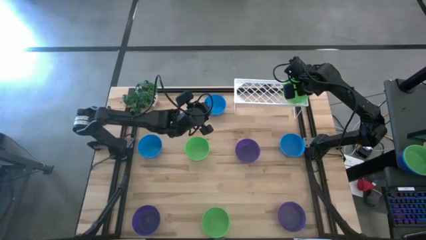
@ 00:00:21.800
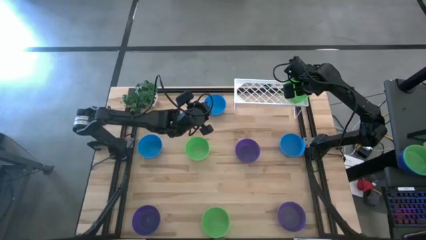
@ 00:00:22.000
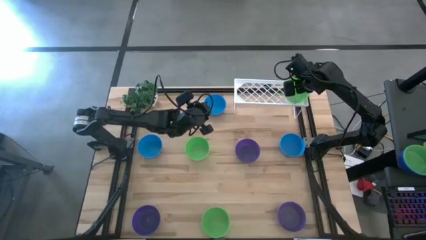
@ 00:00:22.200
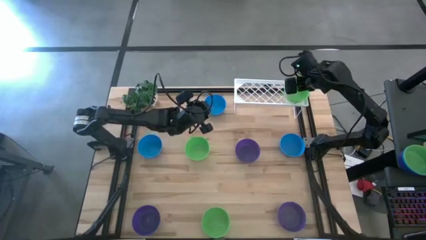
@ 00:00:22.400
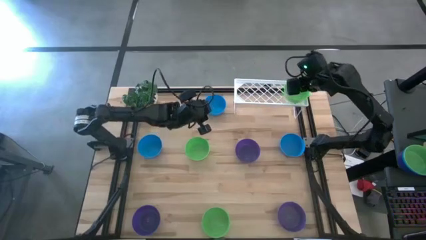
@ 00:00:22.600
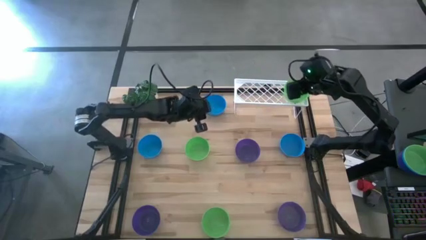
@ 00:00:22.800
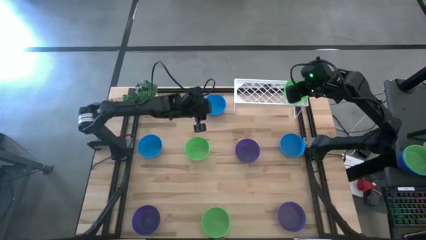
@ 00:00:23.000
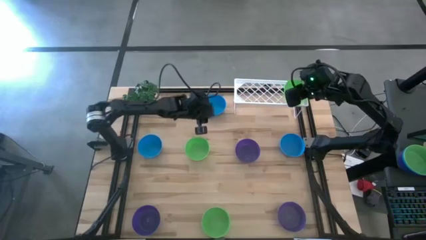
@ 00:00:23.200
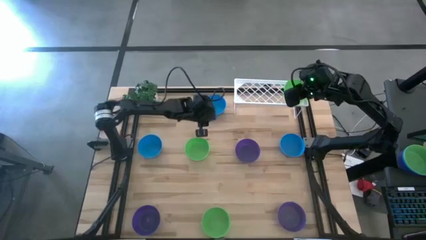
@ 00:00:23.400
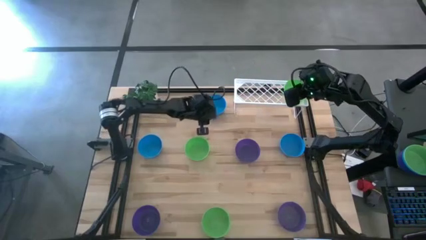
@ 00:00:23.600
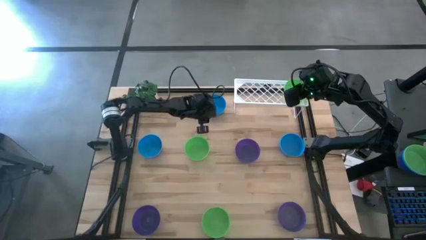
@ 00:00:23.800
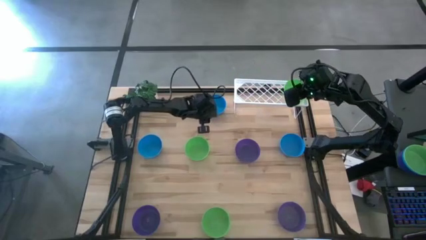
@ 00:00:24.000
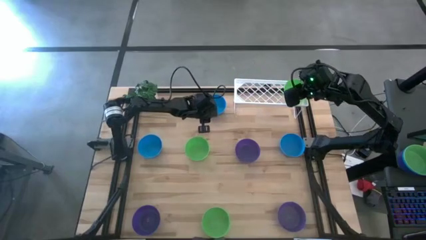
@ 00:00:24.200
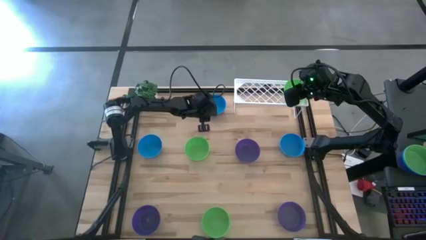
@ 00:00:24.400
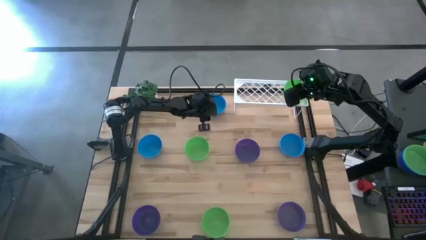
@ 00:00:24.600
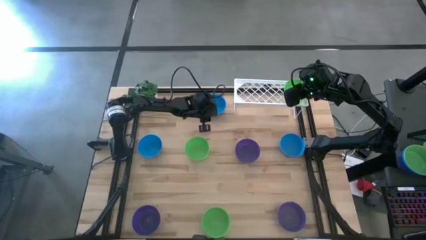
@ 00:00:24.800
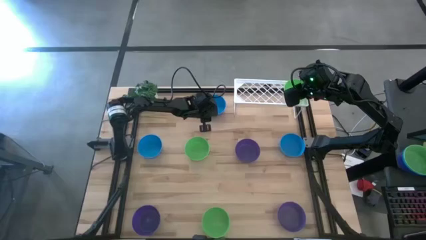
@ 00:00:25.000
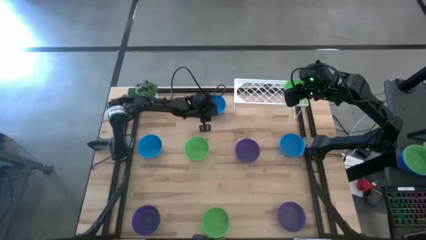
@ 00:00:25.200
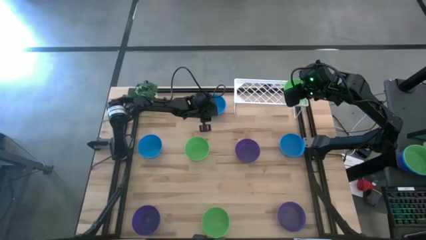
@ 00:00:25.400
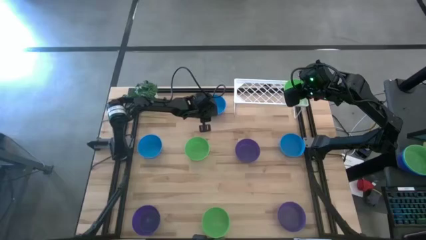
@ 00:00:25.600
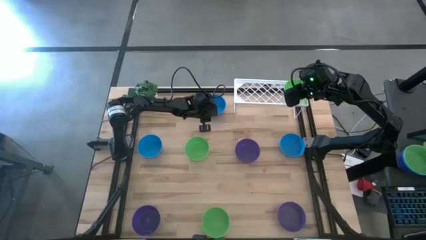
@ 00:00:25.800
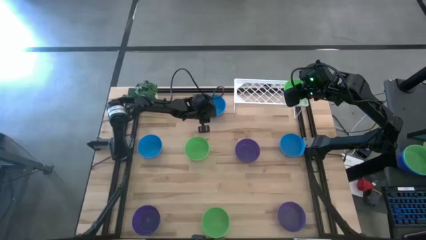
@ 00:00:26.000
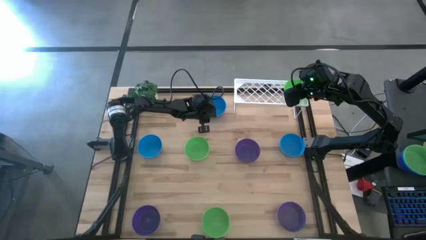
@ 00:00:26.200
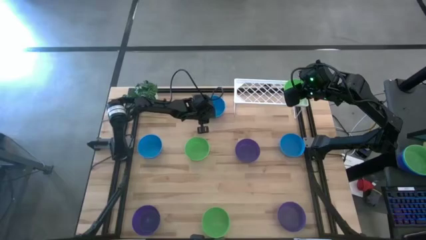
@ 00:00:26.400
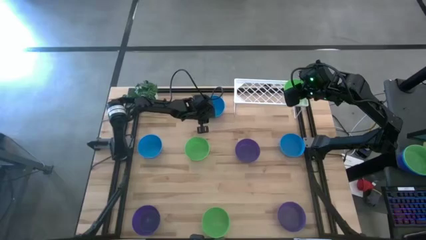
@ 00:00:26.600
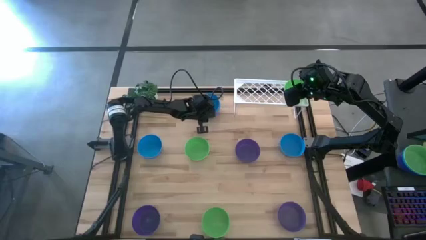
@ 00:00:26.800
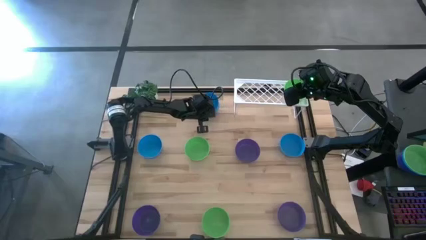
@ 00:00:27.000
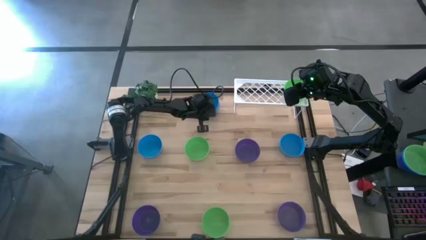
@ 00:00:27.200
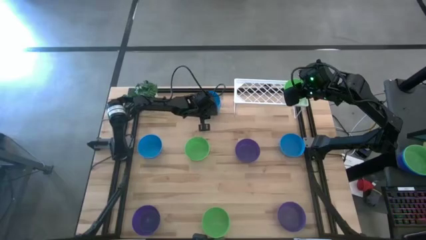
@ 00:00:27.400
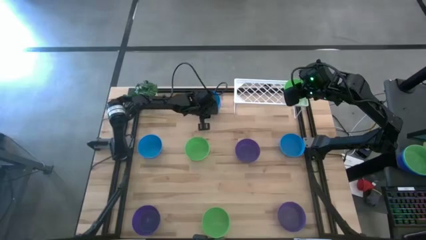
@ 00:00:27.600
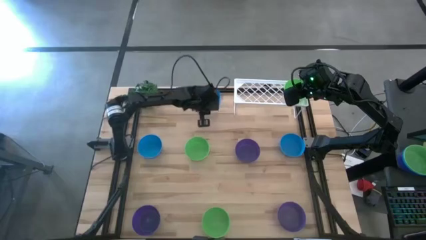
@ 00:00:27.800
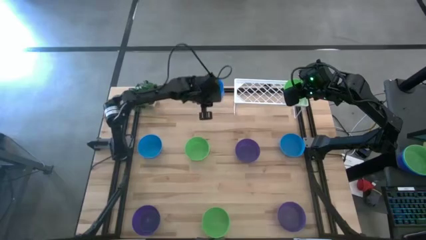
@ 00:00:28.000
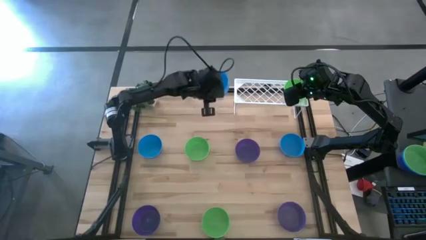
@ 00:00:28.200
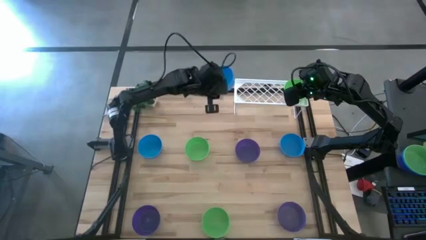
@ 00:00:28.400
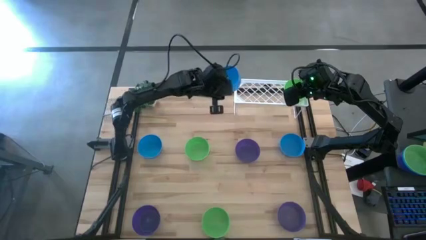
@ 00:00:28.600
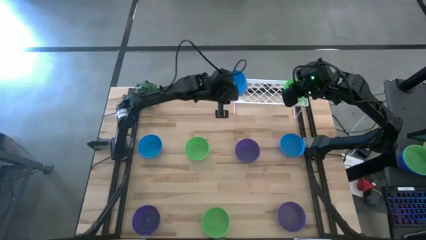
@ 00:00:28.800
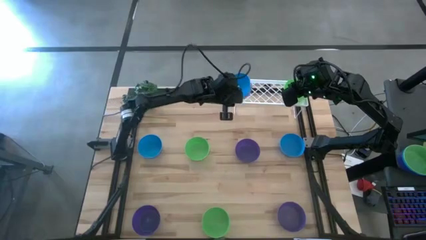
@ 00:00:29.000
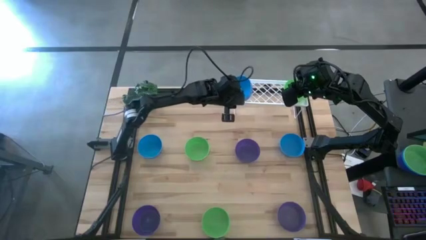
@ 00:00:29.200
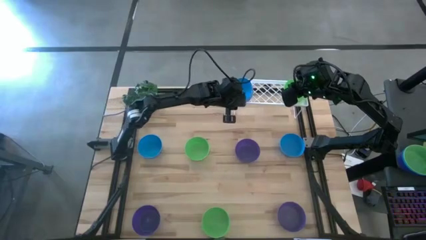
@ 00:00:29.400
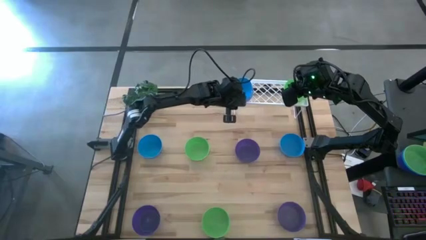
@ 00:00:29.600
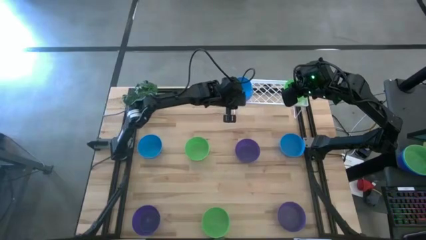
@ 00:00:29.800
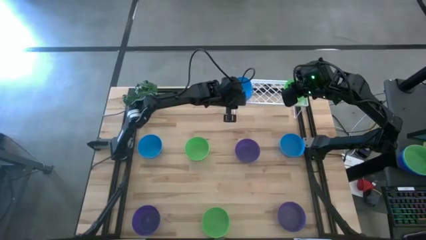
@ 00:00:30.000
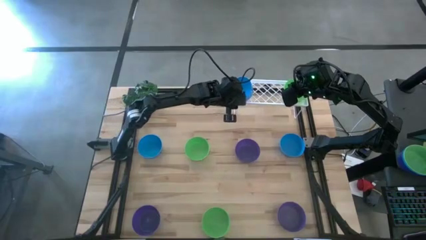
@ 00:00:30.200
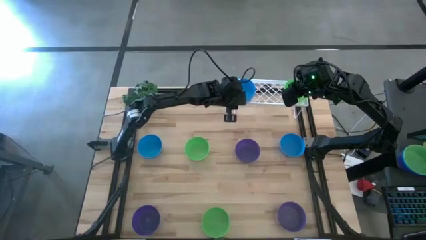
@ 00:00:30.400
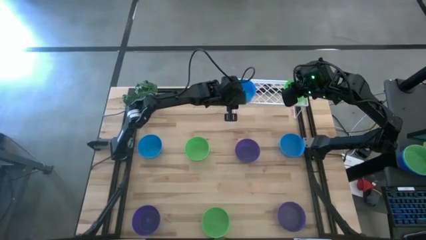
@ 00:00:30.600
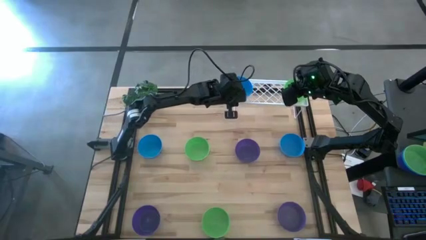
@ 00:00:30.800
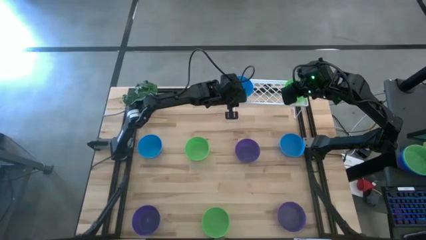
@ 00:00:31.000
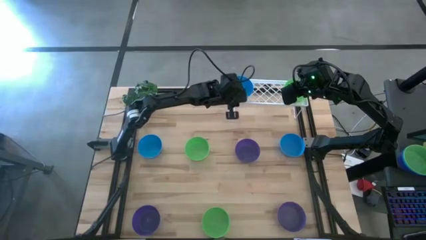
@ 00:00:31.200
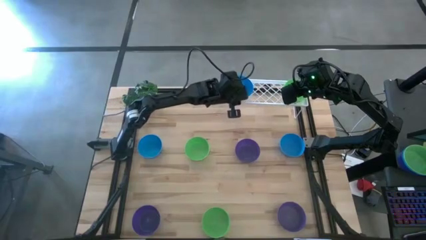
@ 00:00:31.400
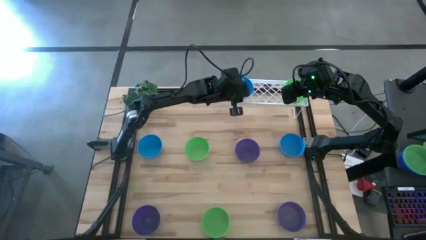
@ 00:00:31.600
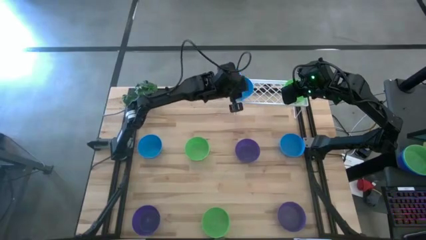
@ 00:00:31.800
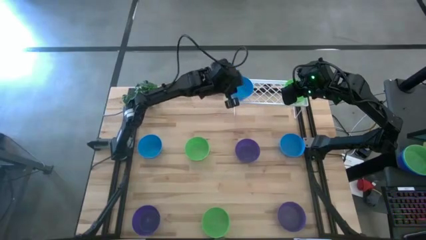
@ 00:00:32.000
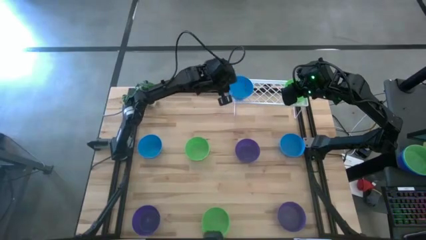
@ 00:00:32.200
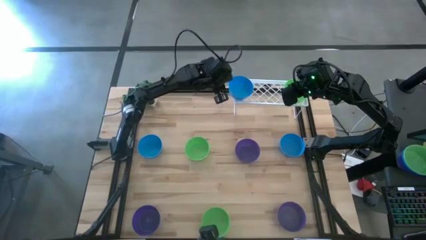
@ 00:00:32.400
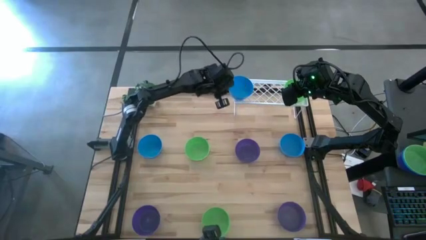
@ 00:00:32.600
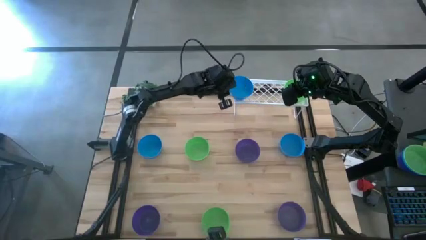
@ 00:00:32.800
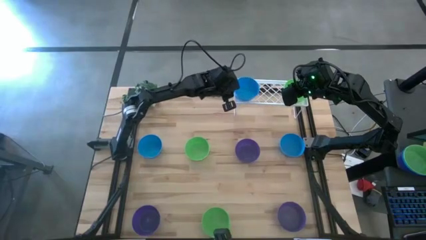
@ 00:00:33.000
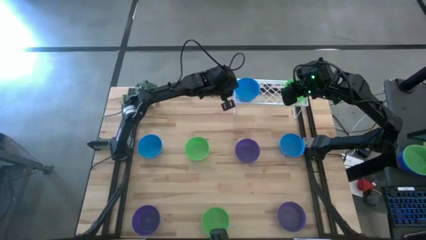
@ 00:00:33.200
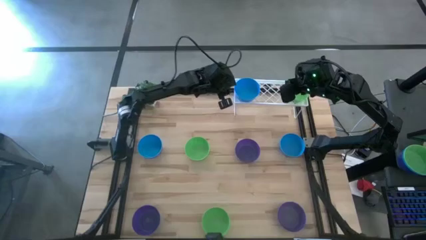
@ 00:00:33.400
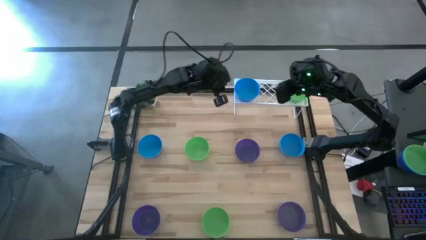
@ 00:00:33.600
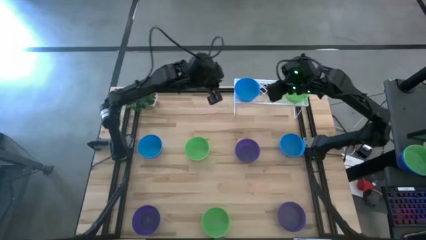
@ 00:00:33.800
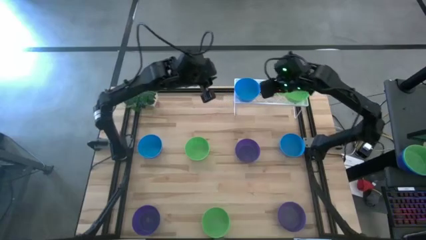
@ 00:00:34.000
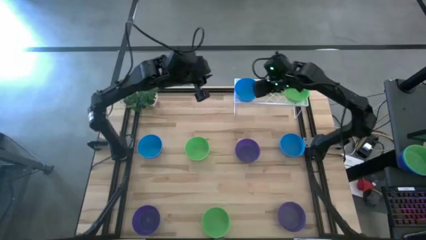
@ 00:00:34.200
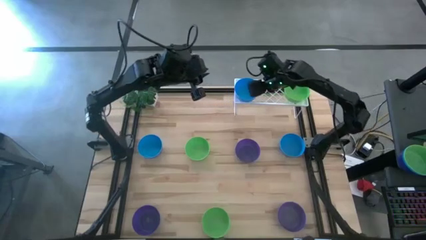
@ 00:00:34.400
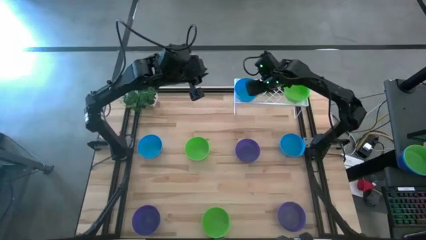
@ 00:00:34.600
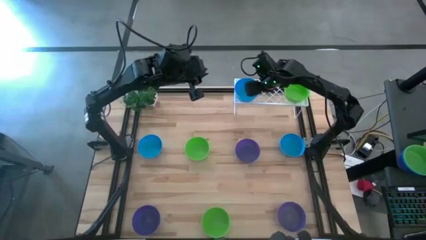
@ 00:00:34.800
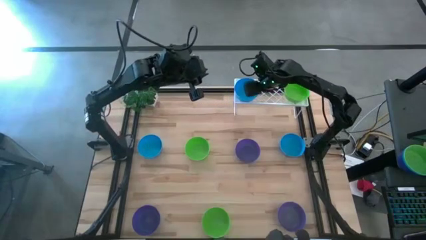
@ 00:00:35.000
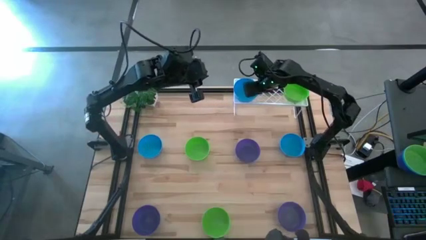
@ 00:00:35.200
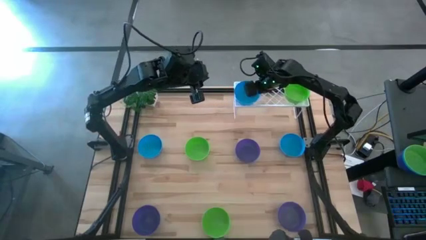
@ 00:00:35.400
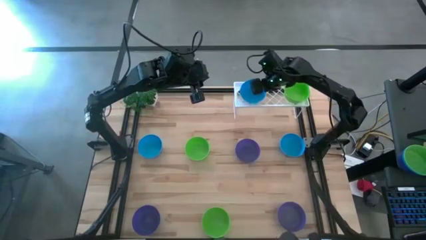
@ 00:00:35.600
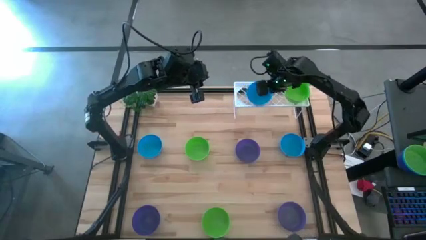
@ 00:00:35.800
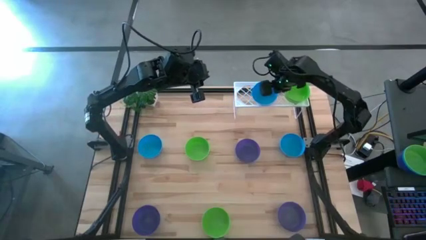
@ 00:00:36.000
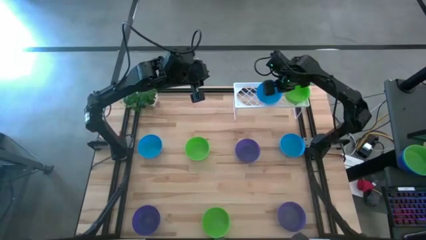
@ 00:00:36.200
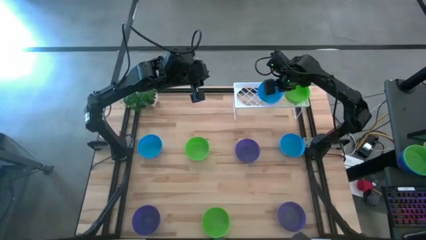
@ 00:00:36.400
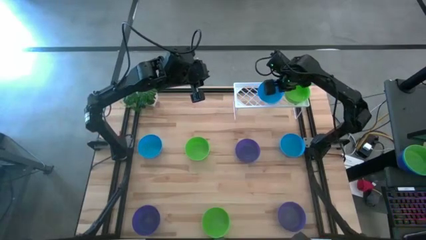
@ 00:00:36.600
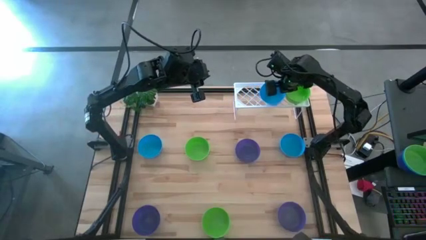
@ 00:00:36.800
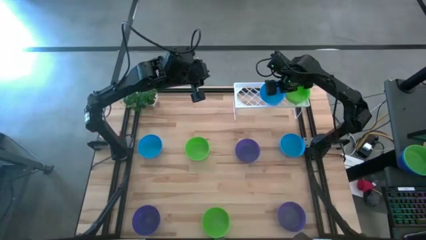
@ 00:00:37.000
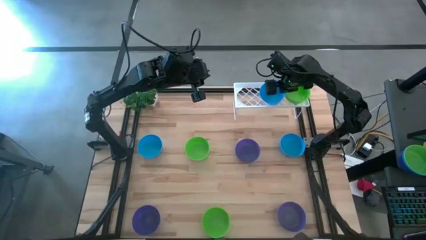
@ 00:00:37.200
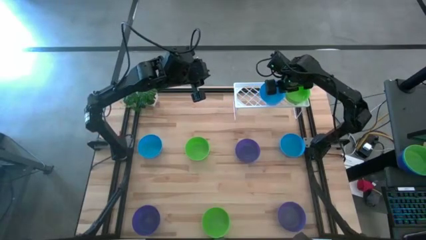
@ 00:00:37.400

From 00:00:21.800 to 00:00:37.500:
Task: Pick & Place Mini bowls
Put the top blue bowl on the shelf
